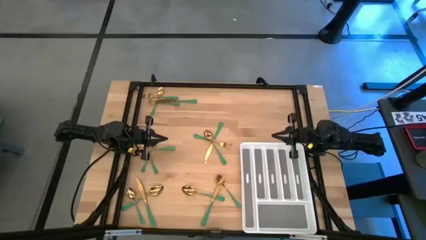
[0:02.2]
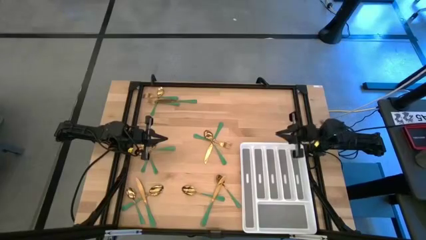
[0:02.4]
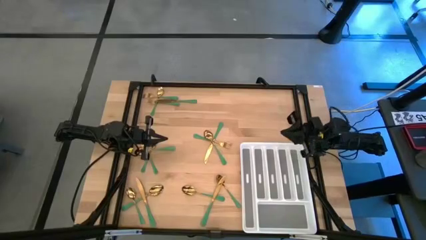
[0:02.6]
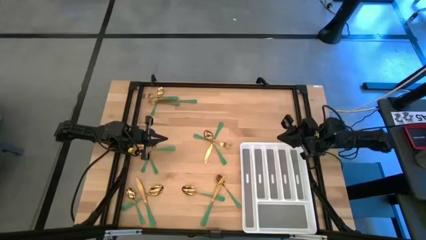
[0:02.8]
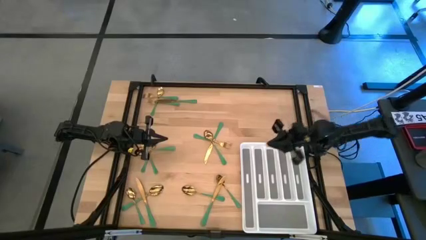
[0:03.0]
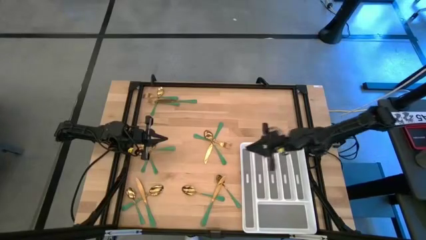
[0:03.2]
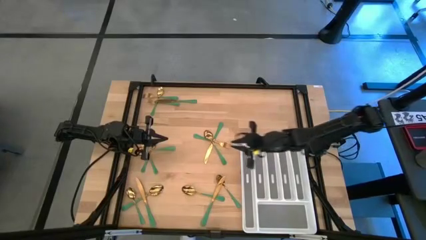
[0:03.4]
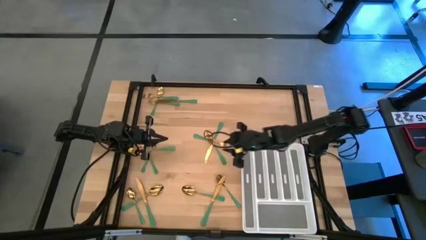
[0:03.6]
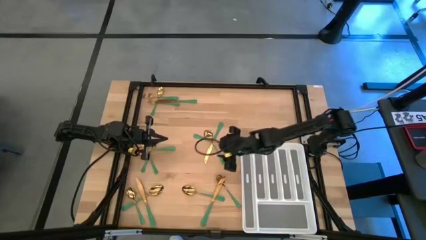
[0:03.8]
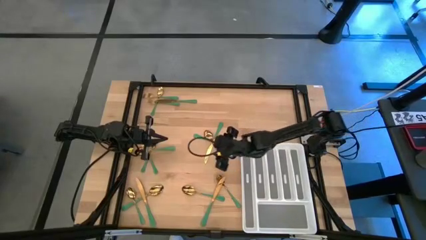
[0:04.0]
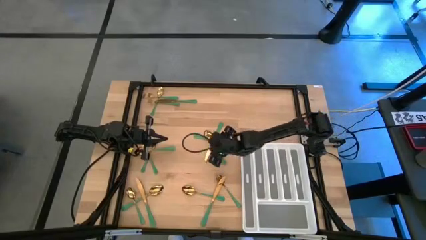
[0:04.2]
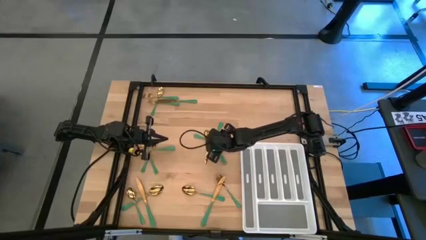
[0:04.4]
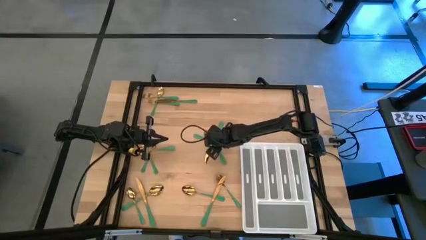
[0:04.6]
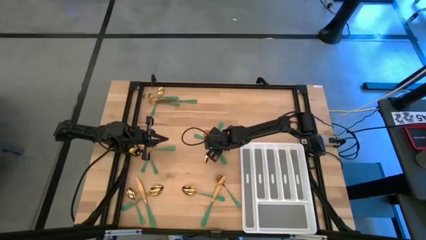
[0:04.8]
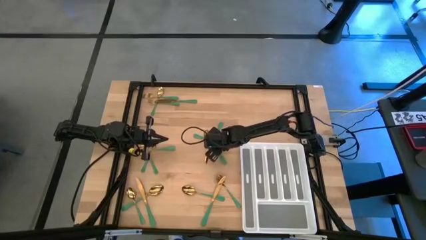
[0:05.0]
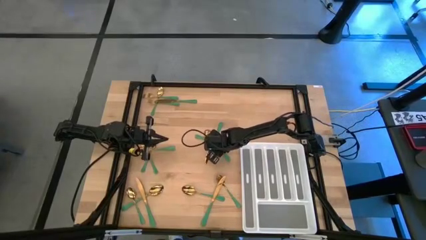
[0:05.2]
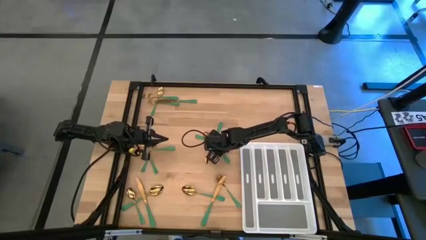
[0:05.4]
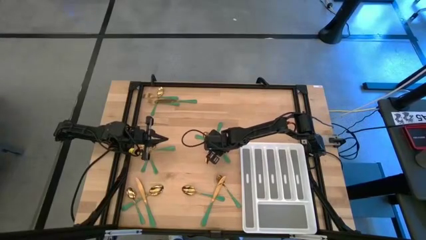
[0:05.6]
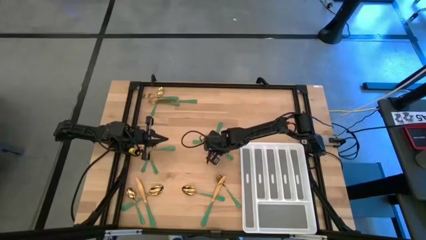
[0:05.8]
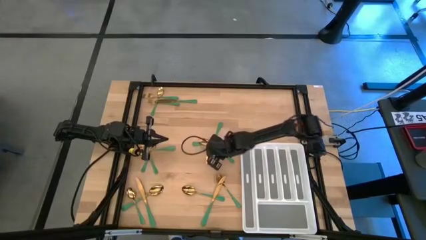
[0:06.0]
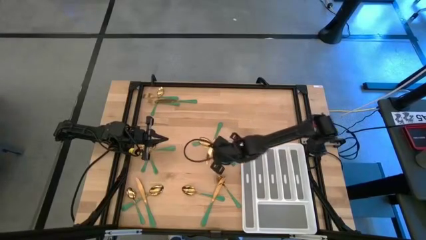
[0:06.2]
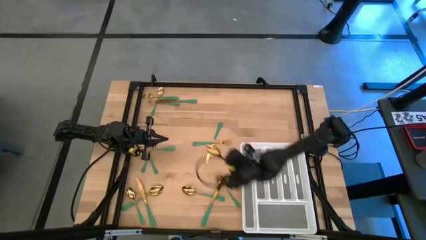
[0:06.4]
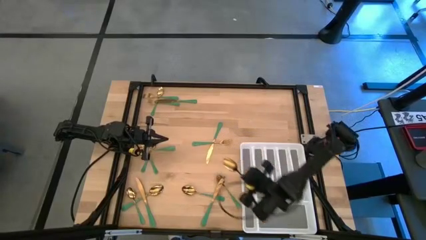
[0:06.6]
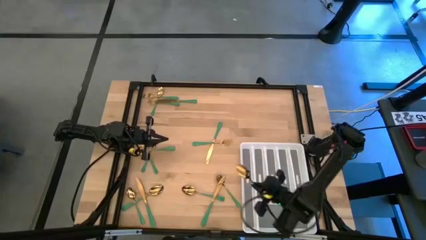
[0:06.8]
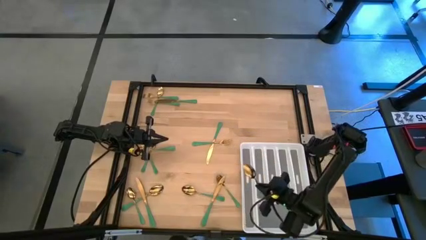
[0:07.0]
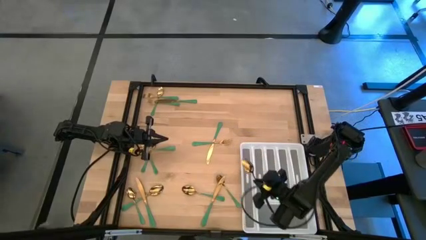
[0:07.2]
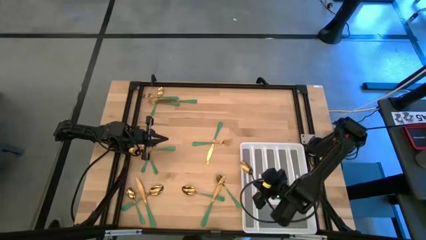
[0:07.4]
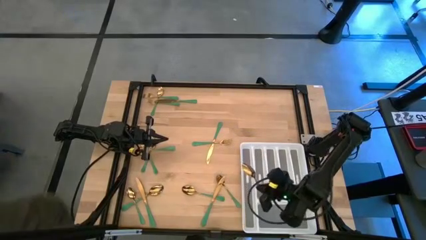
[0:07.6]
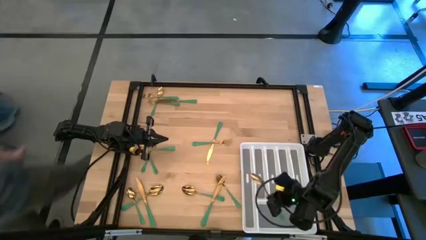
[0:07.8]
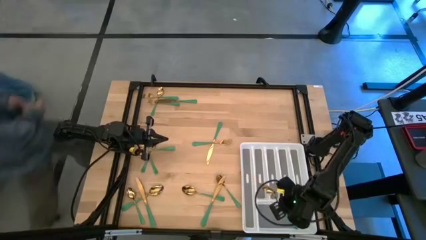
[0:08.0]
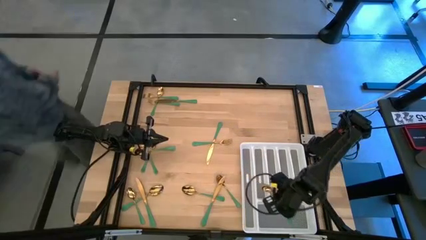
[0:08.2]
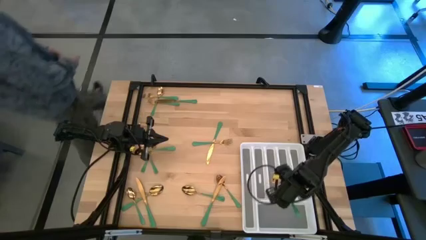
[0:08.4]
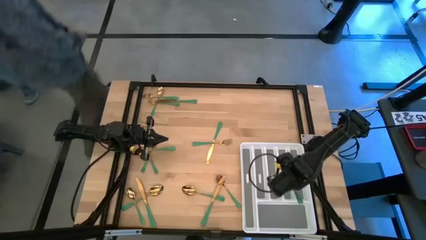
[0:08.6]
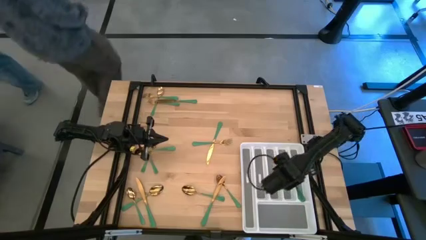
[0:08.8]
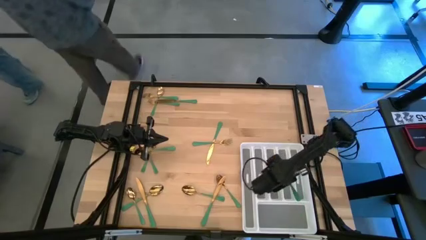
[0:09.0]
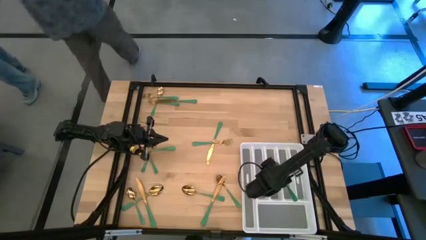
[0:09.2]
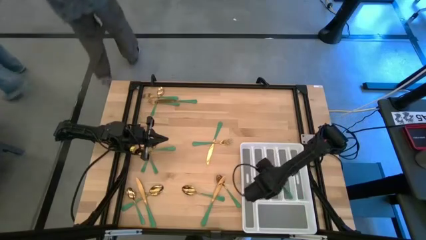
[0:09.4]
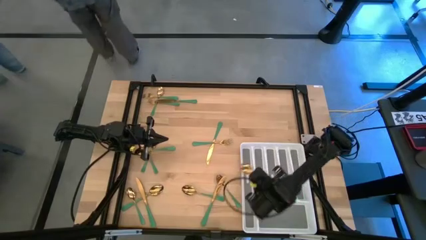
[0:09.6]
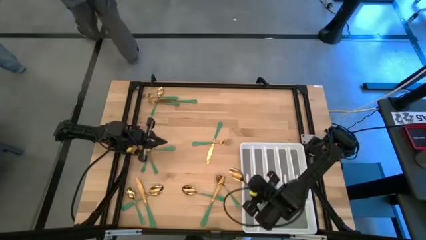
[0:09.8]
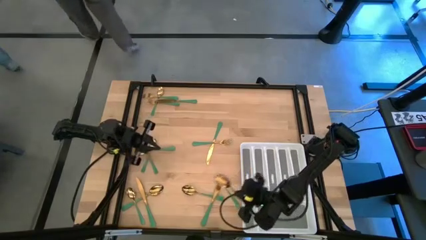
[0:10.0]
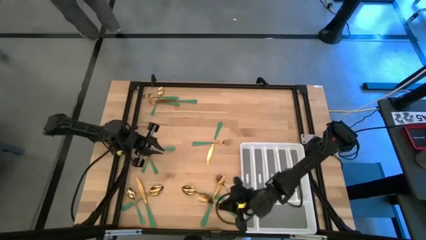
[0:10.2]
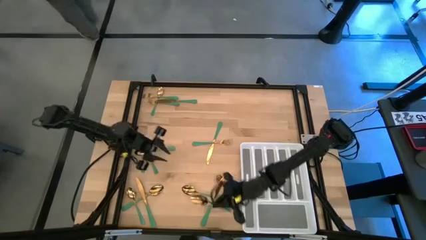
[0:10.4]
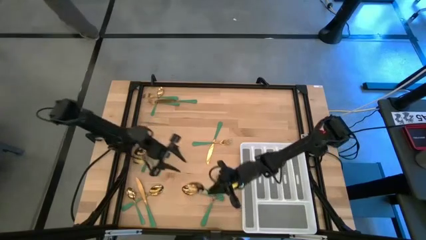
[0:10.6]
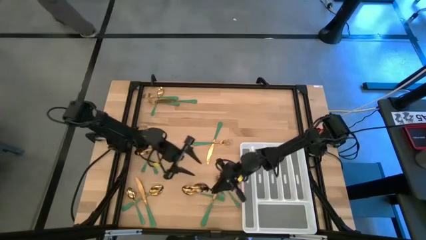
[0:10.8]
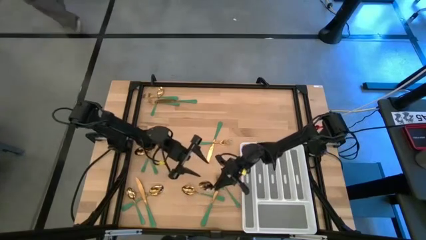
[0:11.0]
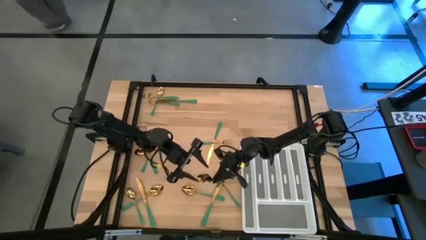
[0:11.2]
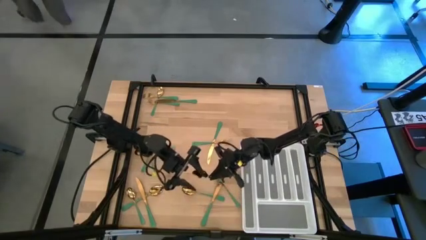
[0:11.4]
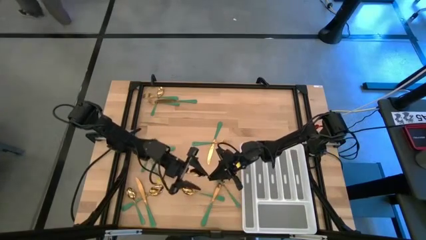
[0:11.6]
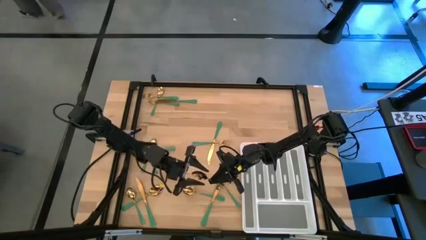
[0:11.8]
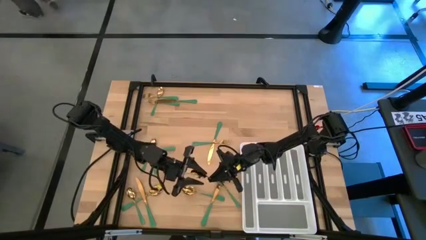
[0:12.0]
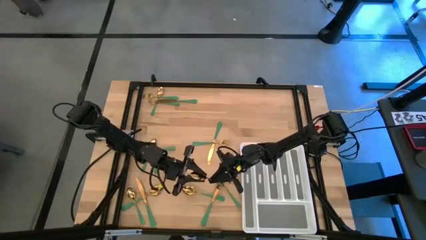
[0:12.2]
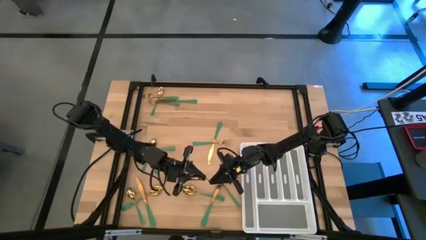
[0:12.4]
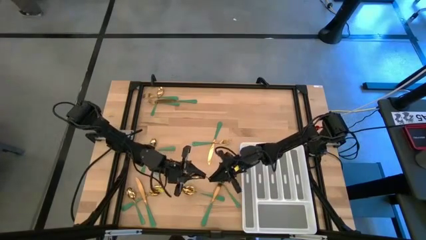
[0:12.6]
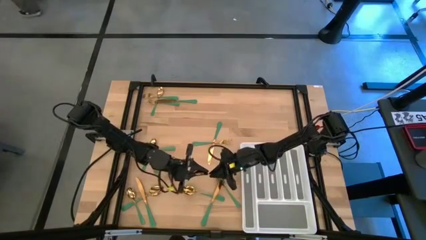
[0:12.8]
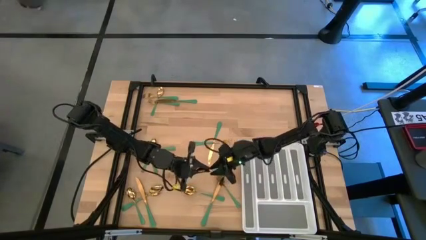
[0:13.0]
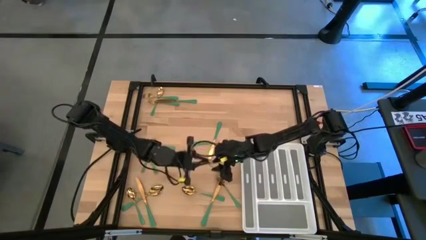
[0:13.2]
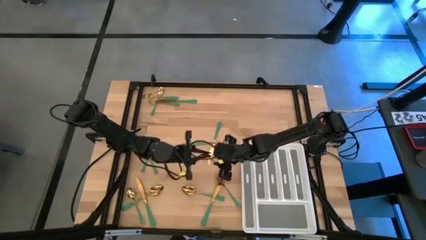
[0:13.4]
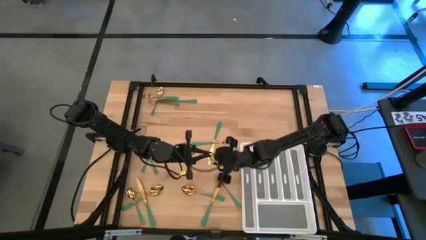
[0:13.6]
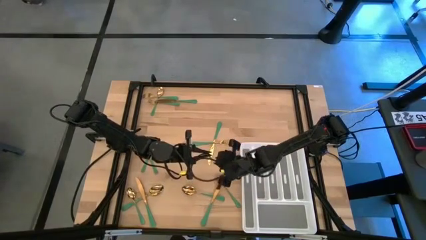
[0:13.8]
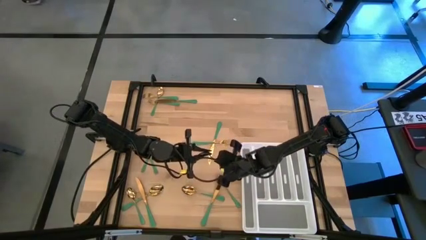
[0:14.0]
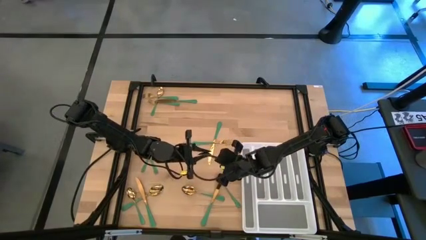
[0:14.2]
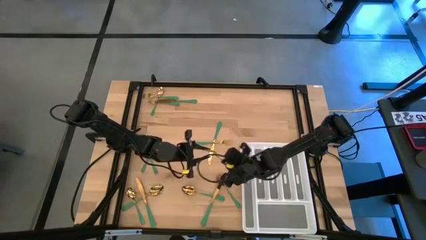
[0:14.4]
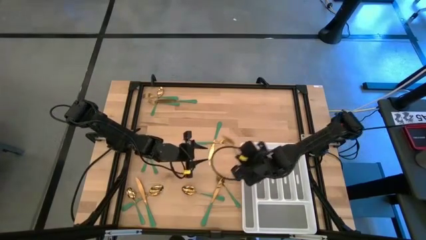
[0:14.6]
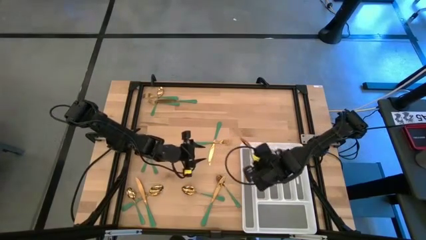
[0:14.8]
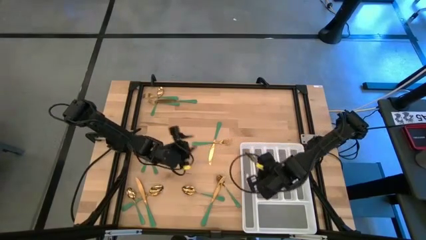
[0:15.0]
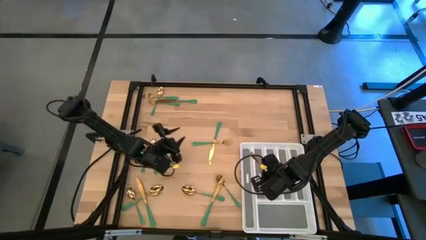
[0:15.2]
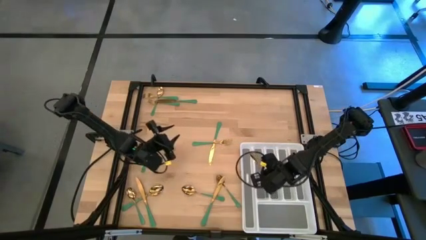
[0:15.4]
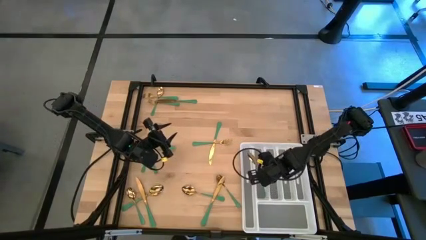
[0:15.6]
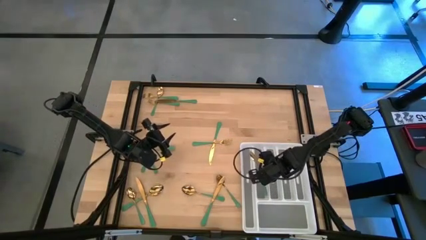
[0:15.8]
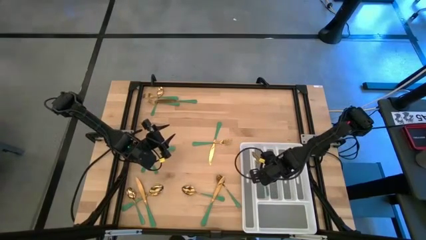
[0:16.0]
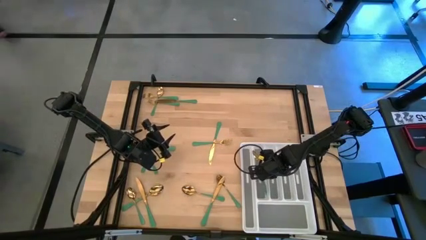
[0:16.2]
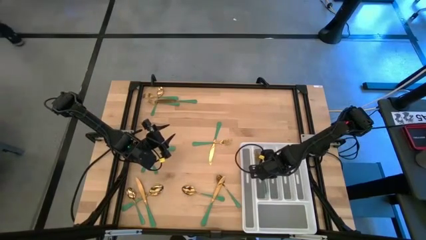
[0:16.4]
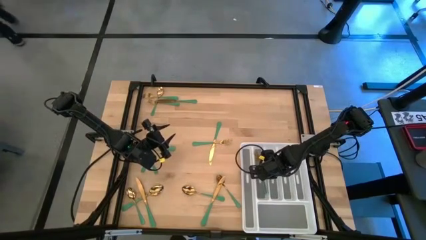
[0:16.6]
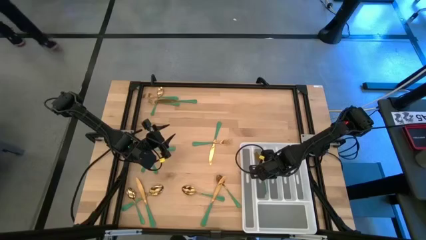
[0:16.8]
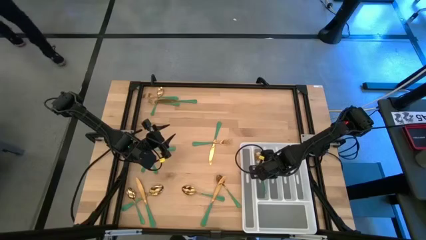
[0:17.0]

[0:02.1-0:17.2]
Task: Sort silverware
Put the middle right green spoon into the silverware rack
